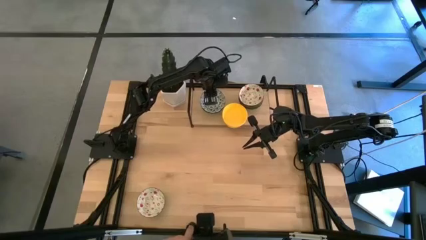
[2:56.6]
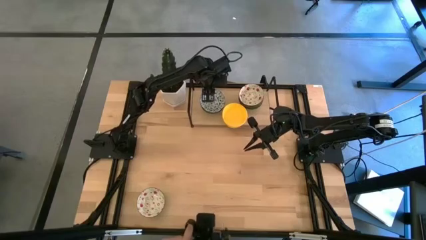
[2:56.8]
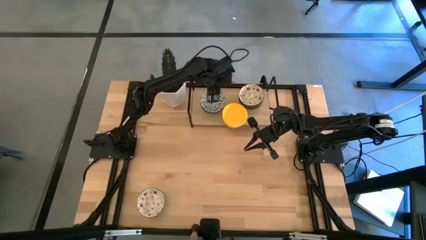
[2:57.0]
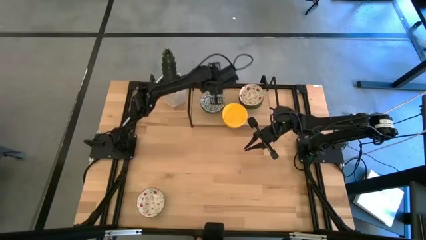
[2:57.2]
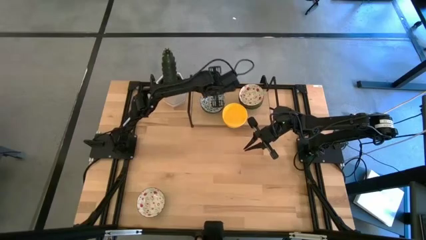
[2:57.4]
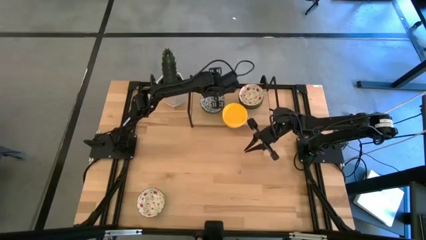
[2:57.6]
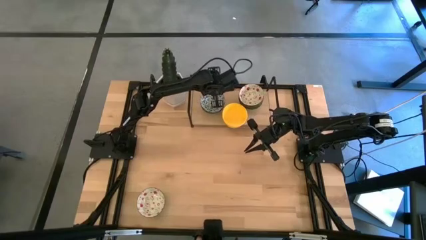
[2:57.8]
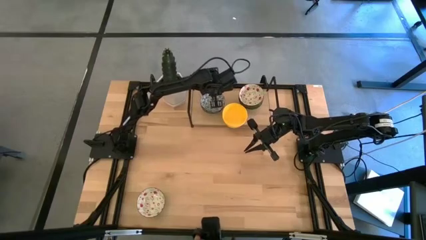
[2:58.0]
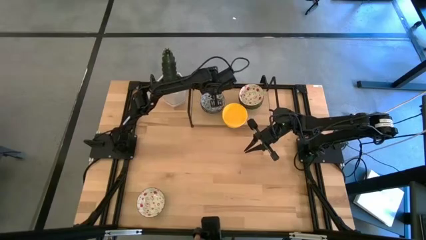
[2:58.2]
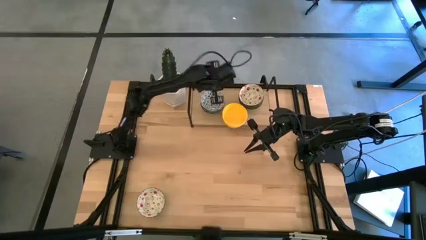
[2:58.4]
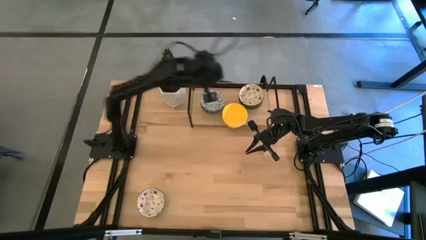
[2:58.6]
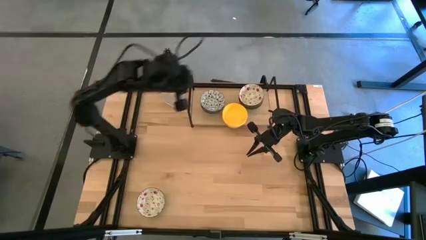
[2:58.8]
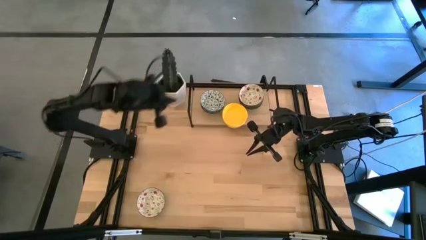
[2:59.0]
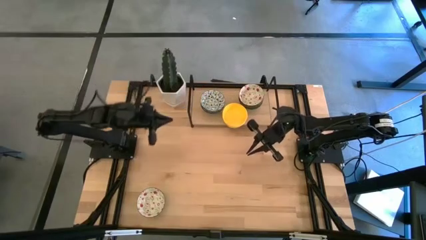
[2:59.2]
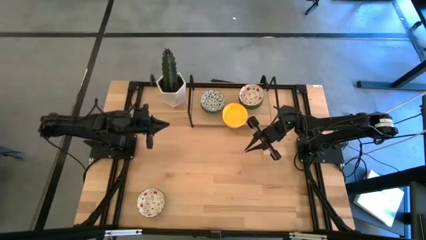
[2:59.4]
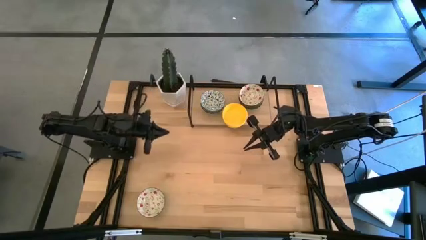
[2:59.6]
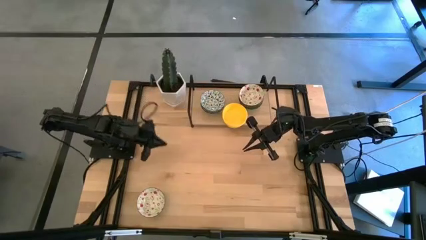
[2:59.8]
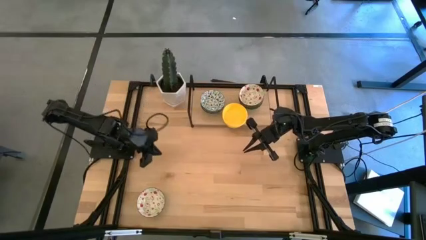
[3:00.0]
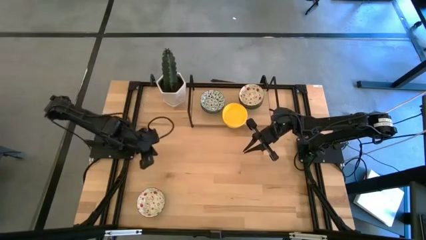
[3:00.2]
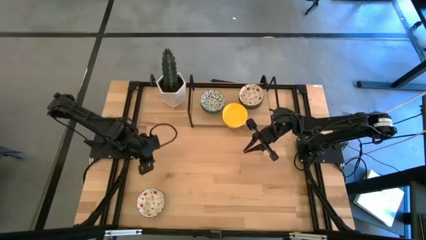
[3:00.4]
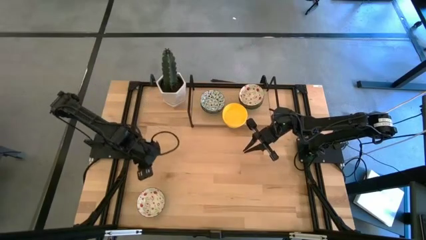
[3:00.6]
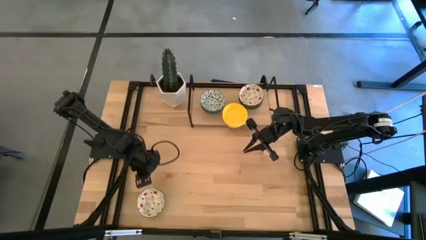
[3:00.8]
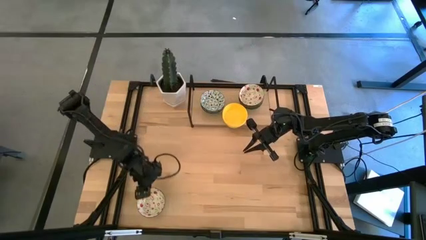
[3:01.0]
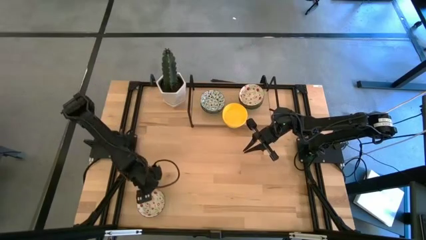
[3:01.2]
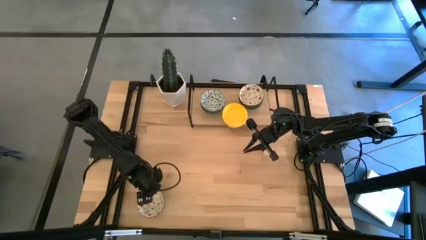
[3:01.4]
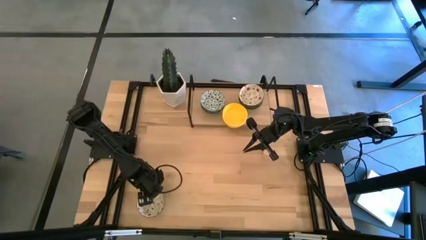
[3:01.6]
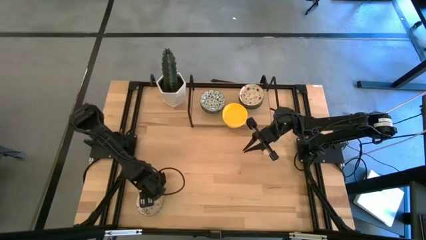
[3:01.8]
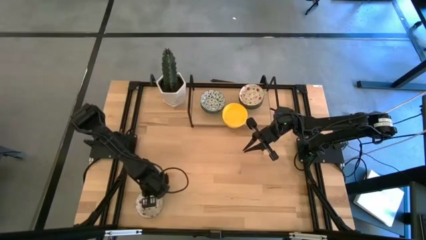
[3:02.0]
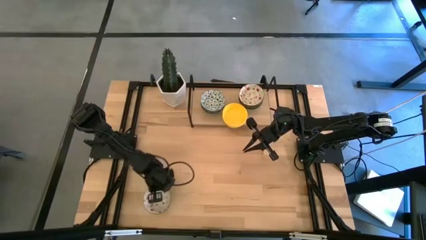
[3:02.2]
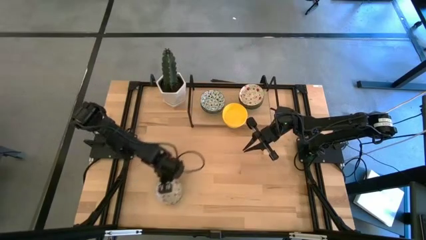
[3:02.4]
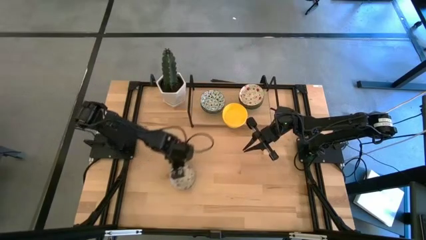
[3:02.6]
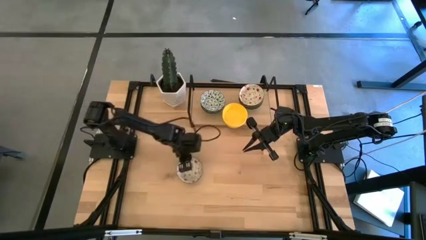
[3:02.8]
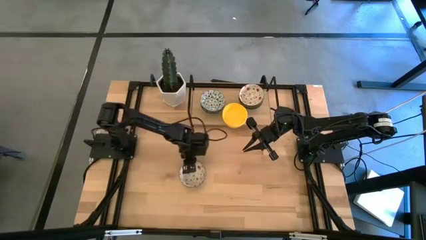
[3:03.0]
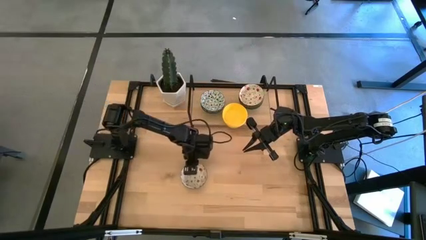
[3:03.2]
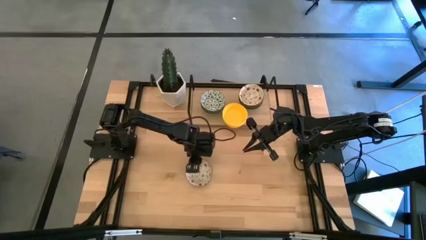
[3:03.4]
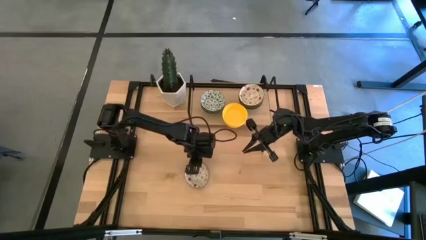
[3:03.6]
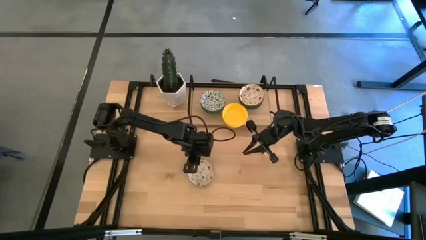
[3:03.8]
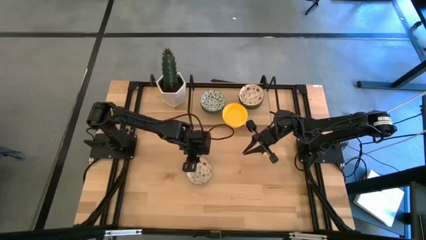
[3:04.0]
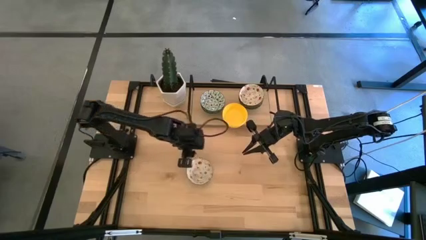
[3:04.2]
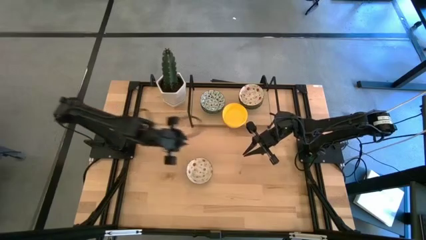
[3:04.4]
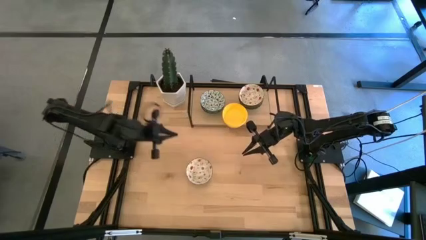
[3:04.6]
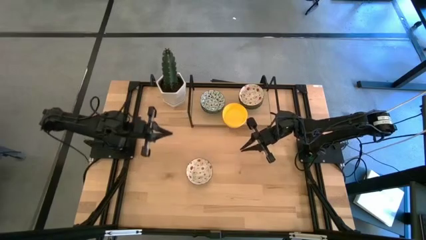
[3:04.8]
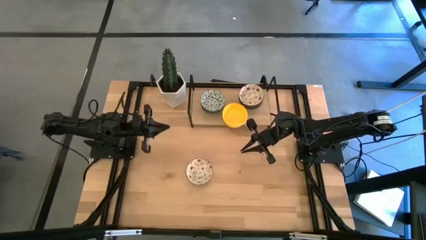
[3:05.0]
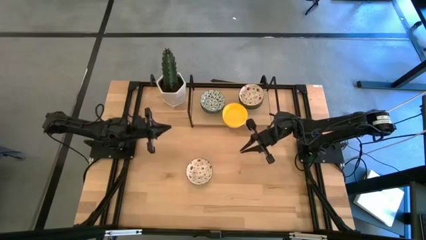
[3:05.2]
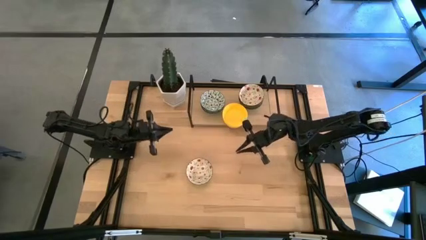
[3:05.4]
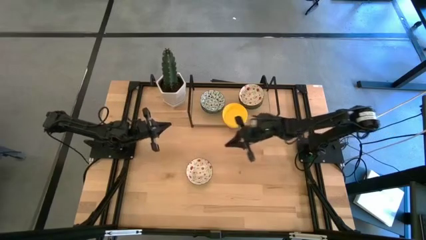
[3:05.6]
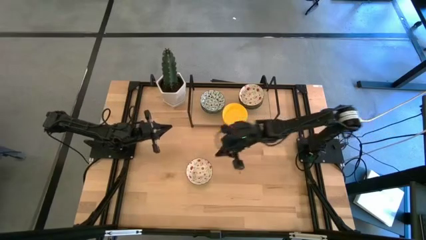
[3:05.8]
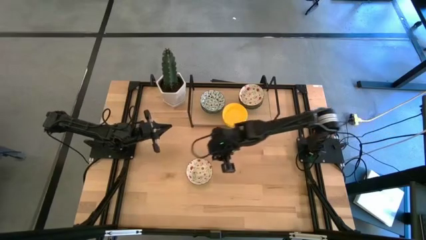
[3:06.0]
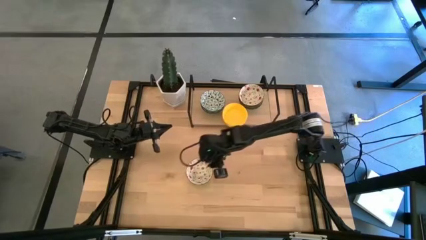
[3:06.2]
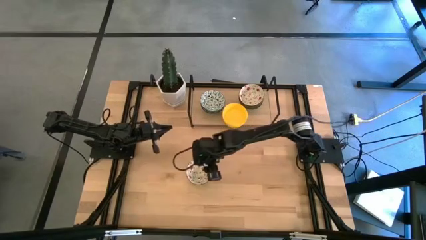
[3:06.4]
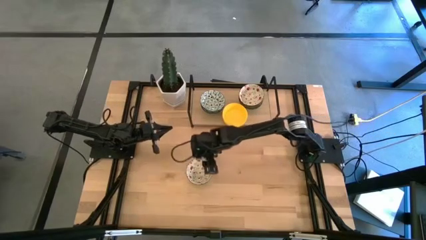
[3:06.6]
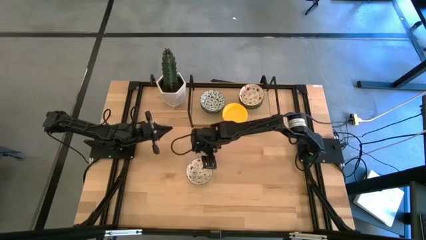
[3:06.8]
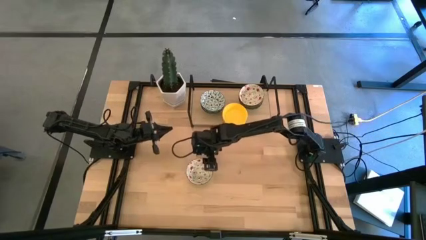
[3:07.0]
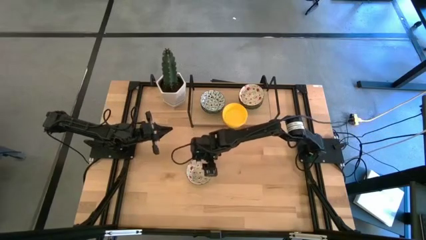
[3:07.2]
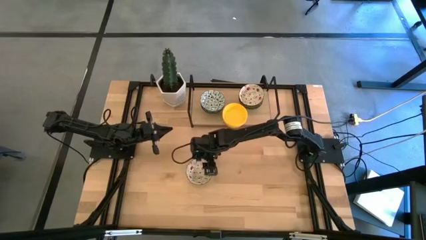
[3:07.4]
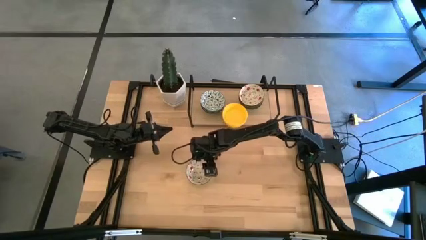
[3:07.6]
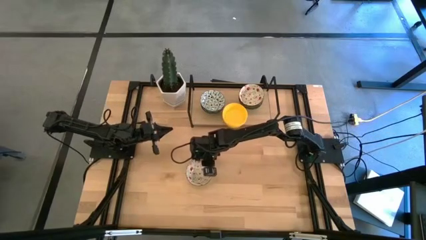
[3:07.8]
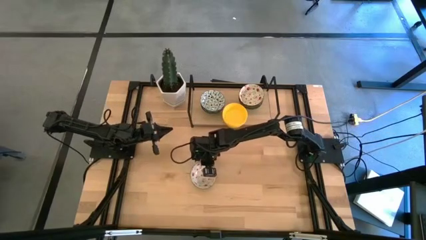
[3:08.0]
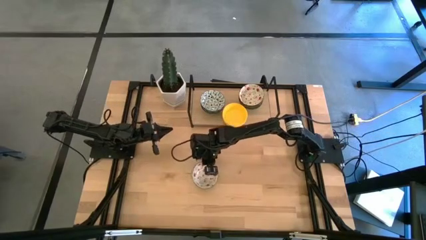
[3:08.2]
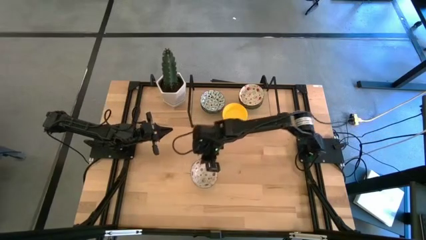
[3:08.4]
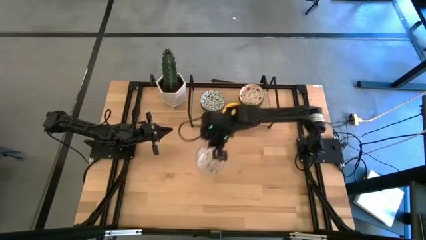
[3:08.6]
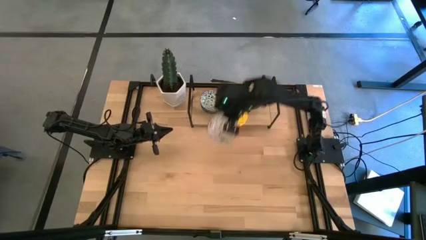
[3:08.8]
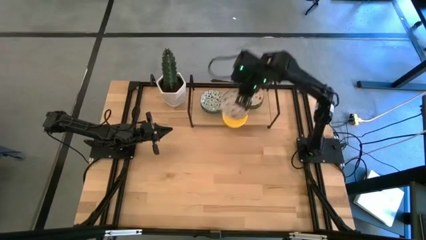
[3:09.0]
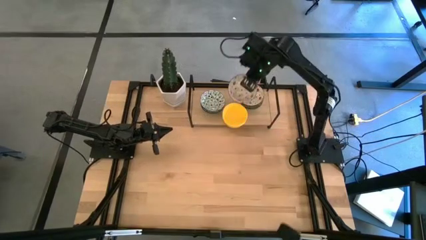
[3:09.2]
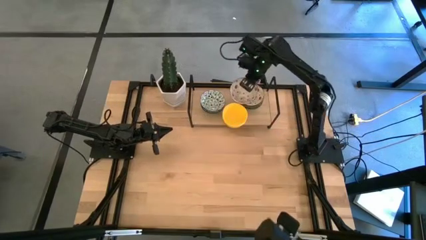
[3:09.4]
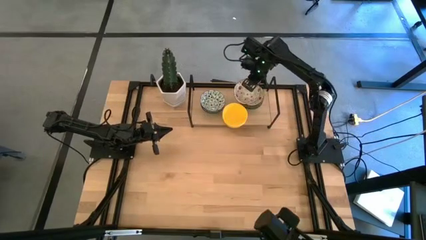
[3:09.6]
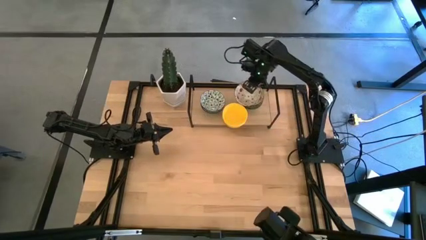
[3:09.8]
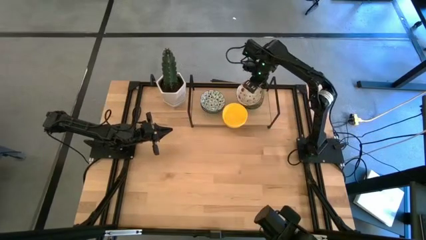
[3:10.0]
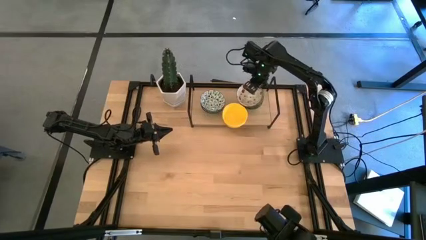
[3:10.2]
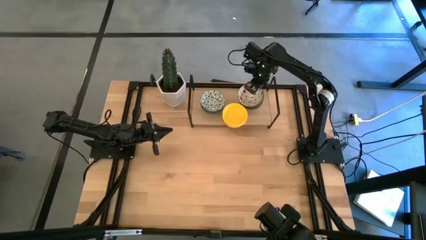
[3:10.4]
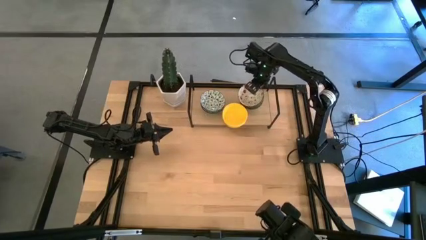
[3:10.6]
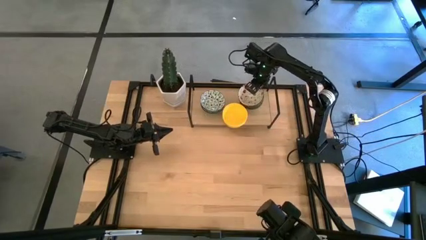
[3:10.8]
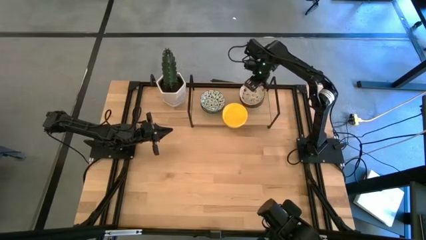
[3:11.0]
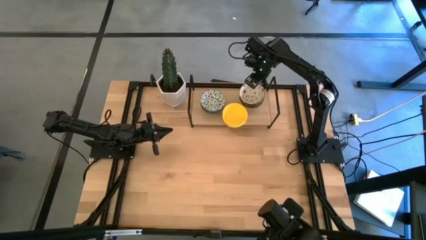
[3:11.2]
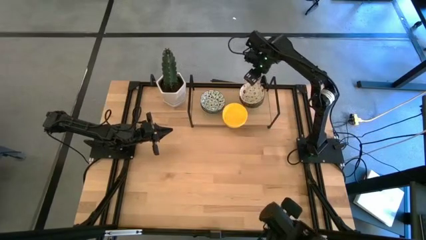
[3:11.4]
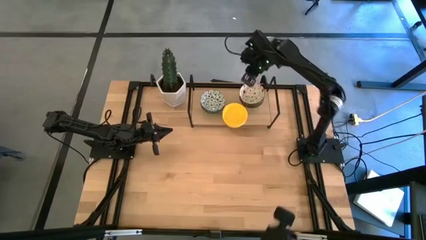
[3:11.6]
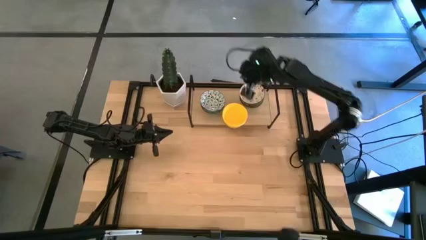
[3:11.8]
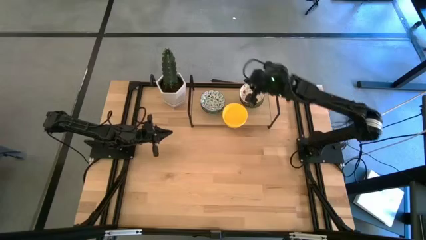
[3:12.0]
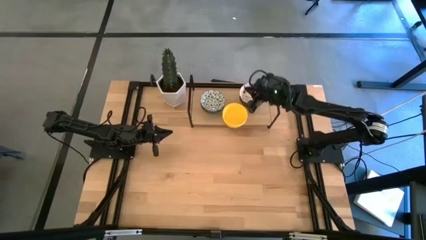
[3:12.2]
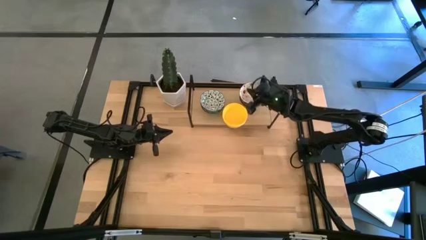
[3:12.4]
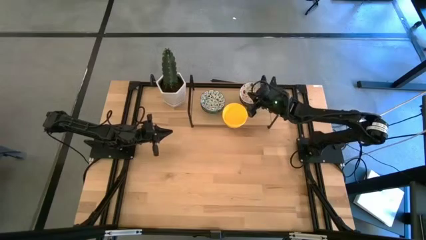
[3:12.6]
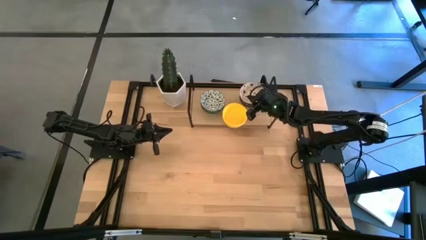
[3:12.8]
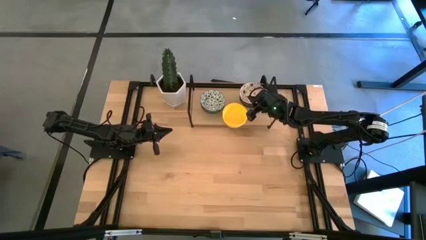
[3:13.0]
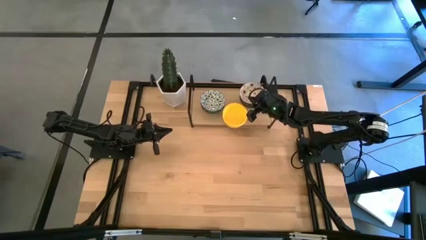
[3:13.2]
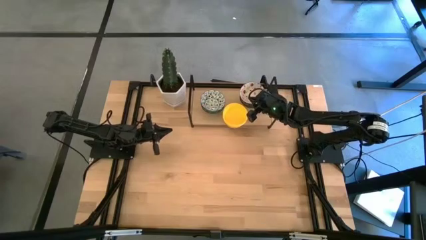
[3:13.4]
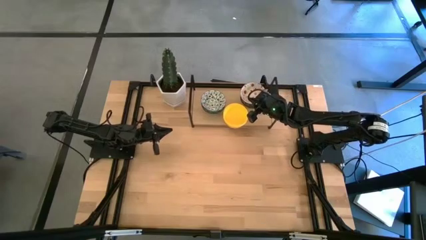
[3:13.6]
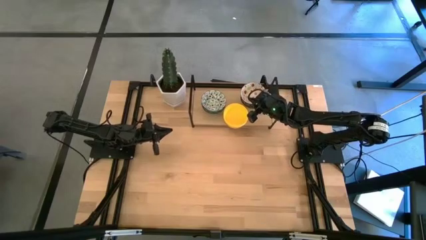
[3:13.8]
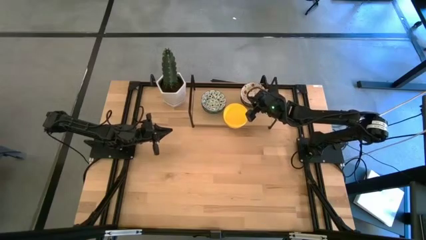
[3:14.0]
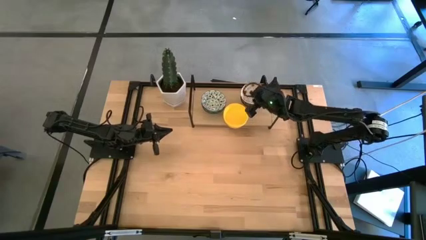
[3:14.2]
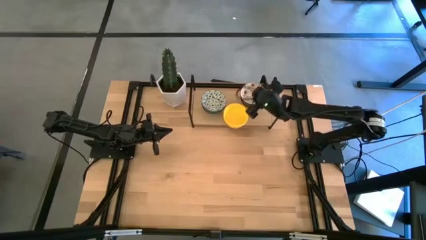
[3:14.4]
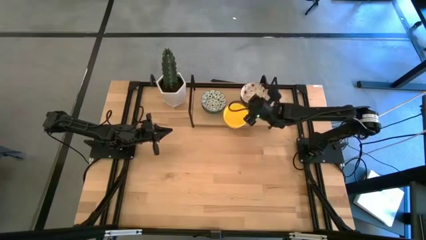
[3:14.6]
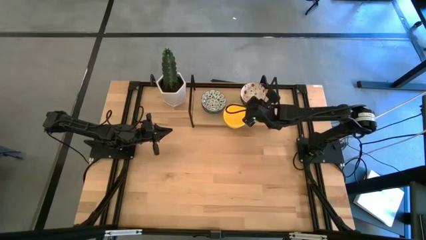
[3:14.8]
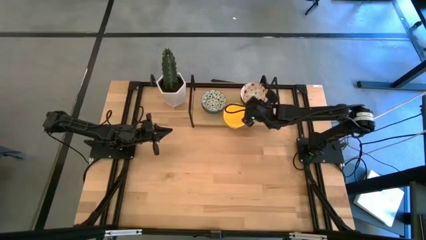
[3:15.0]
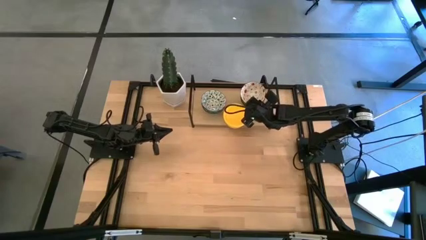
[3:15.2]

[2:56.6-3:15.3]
Task: Pick & Place Mini bowls
Stack the green printed bowl on top of the green printed bowl on the shelf
